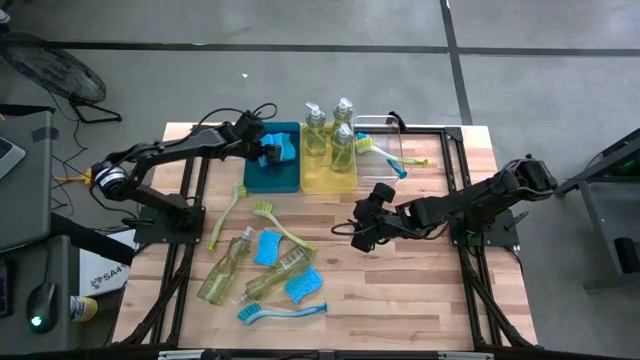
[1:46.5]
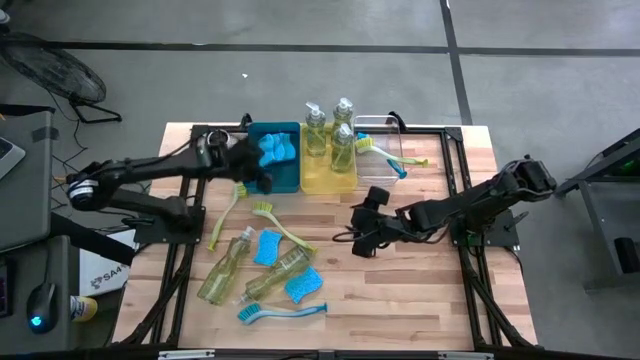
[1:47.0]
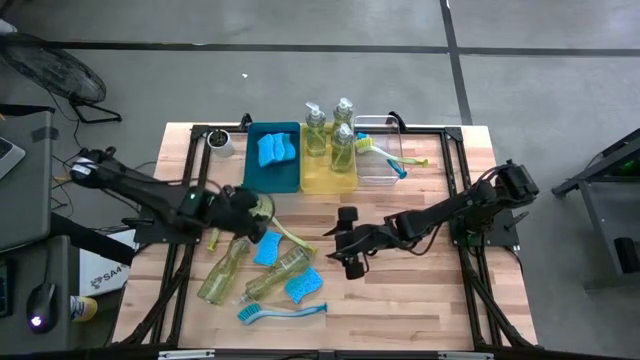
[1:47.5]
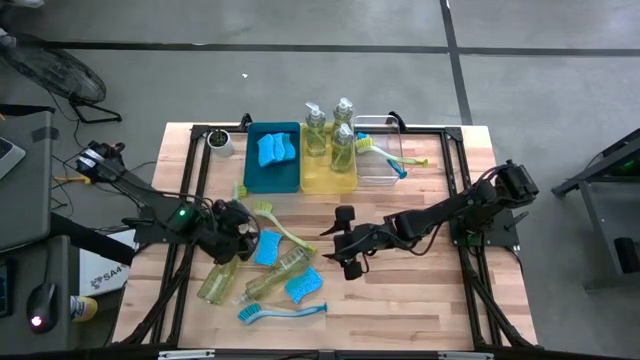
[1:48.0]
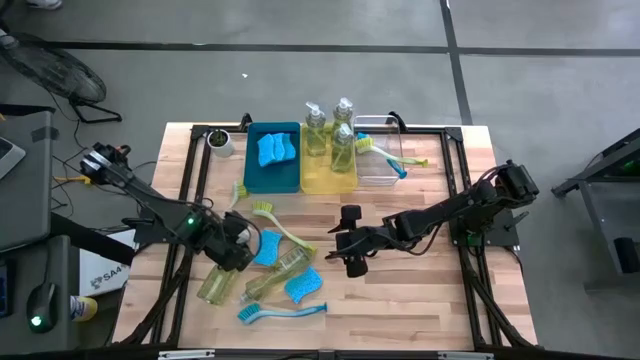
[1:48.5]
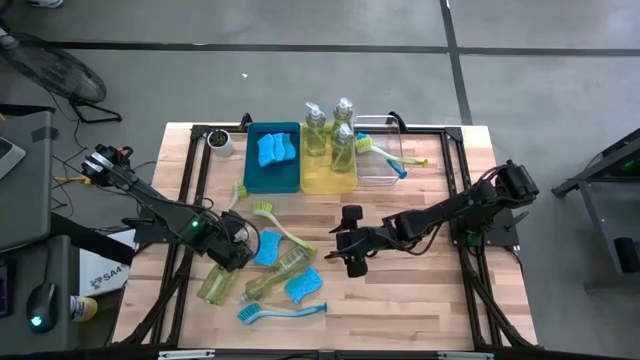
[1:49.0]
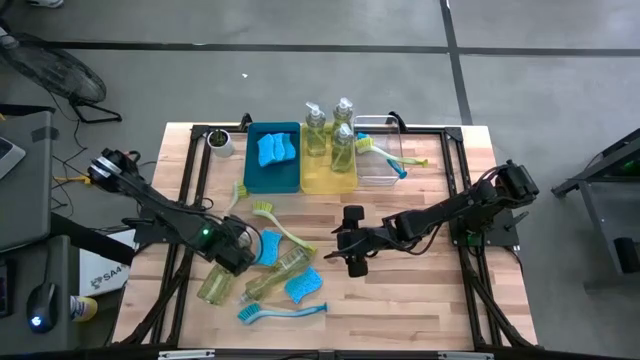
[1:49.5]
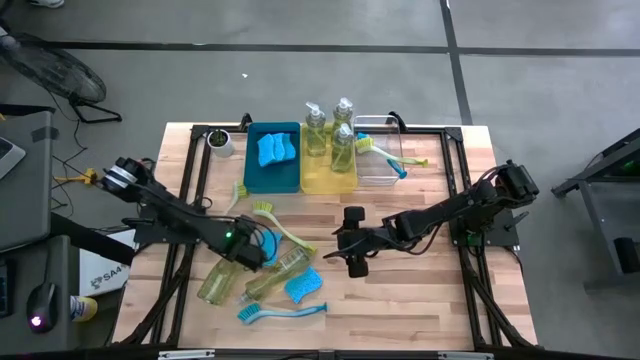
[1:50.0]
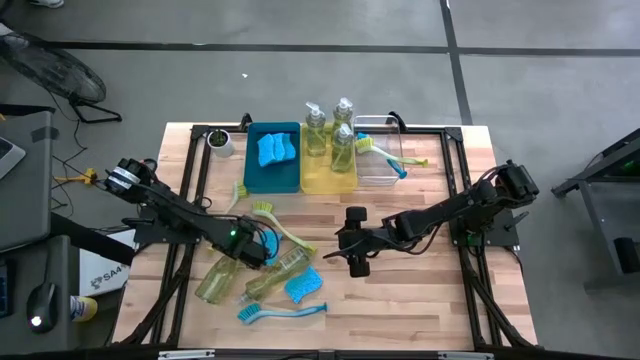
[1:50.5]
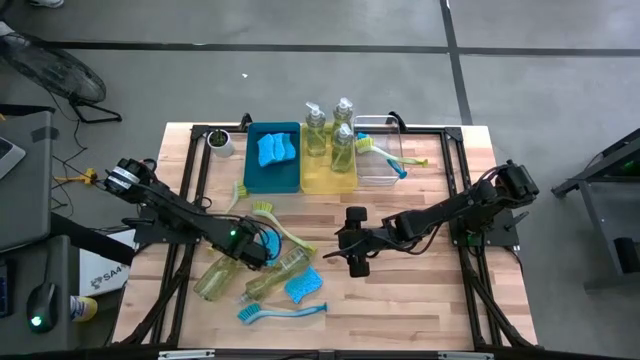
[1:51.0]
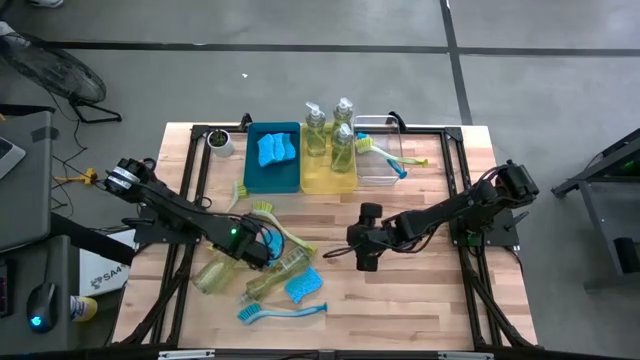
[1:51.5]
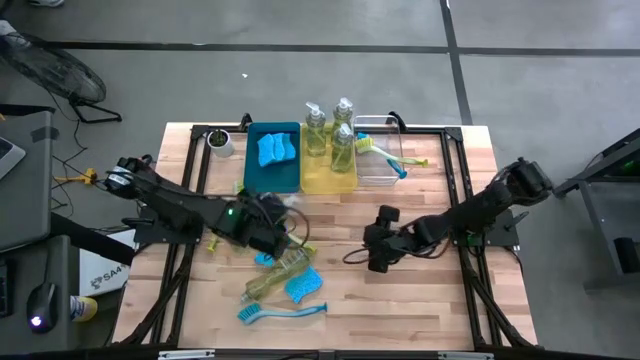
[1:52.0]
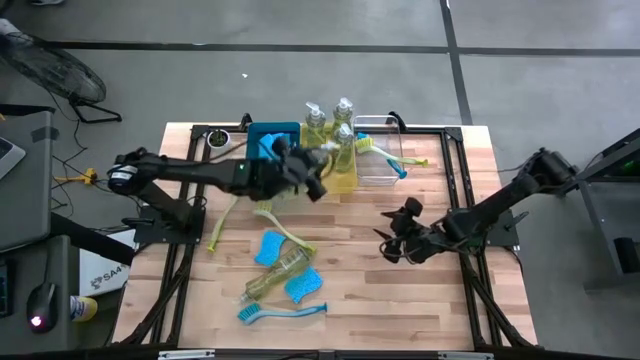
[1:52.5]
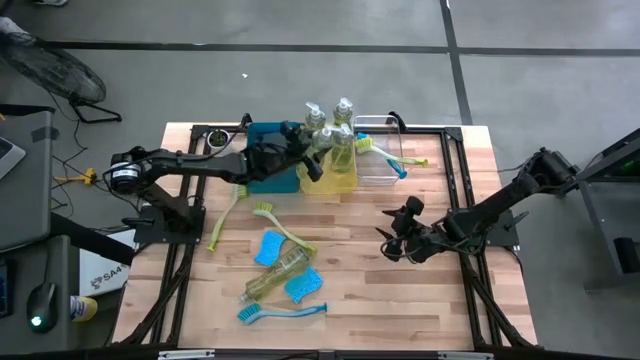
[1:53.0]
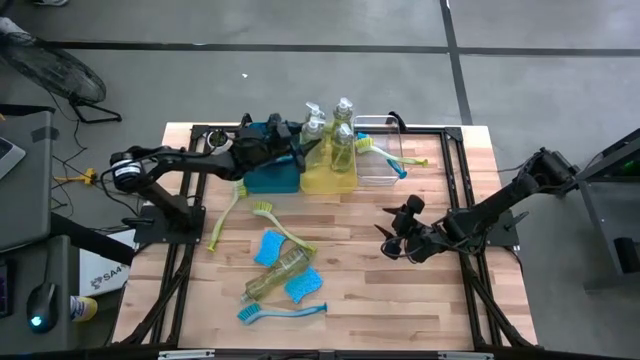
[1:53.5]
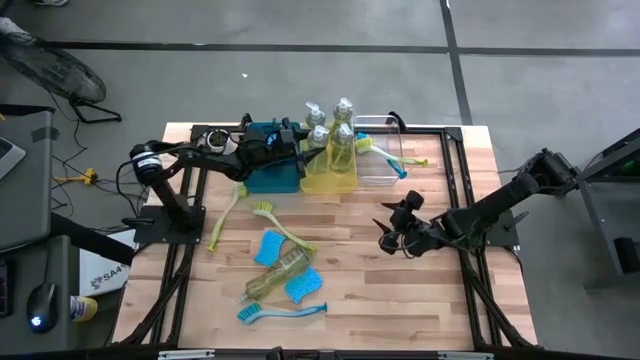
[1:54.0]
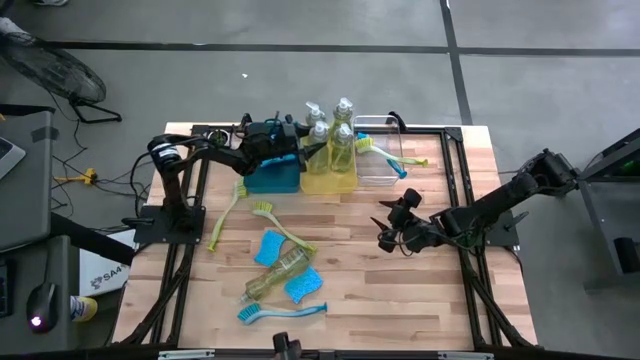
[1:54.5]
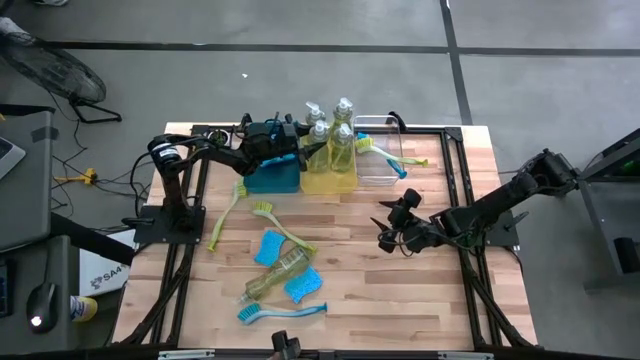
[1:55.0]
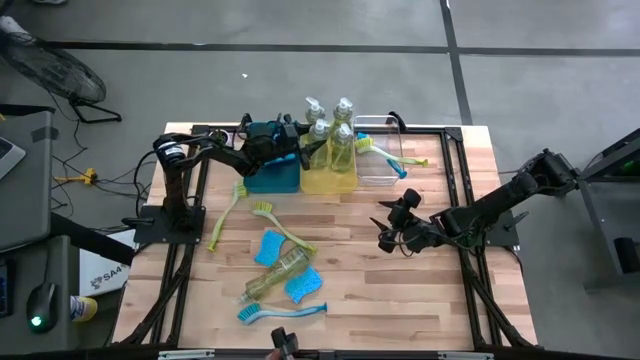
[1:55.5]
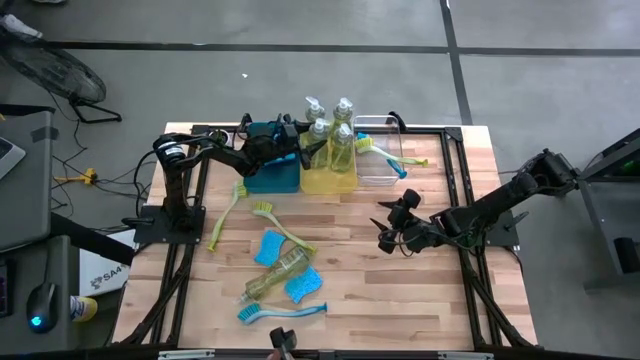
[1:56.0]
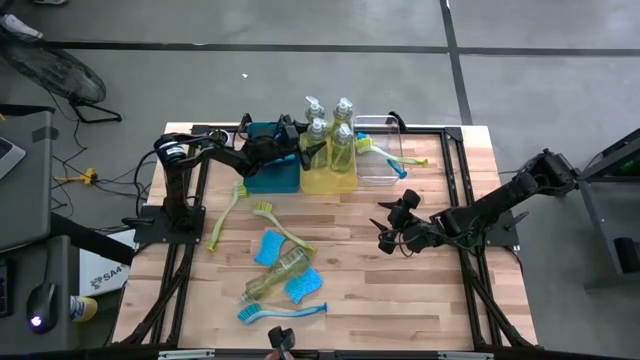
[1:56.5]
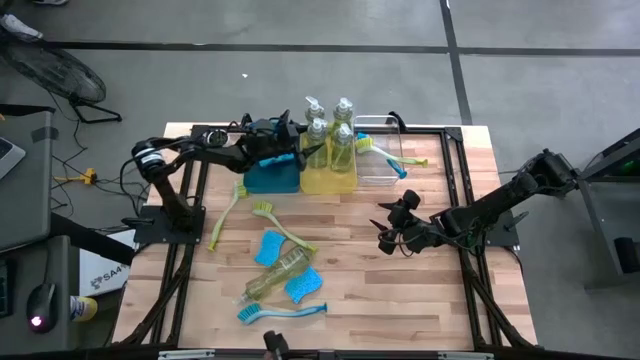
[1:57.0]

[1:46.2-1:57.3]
Task: Pick & Place Kitchen Sink Supplies
Put the dishwashing liquid into the yellow bin
